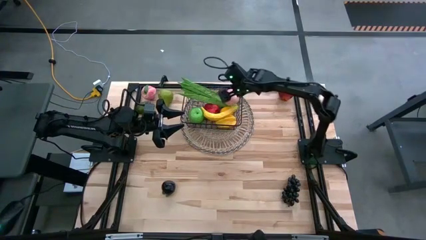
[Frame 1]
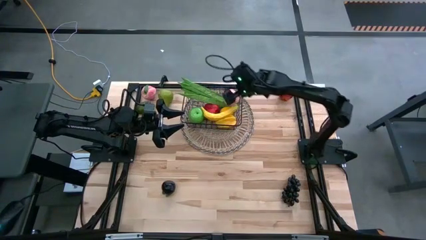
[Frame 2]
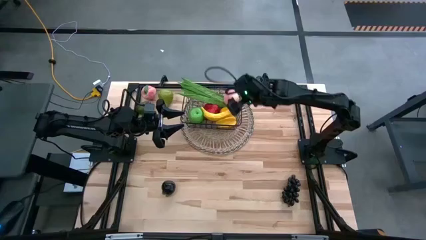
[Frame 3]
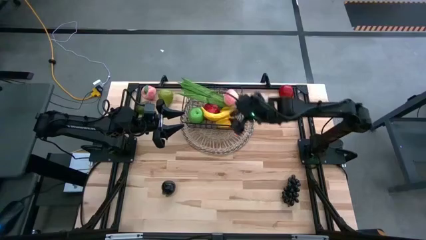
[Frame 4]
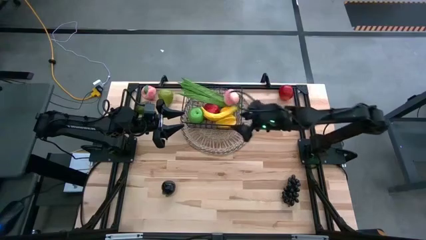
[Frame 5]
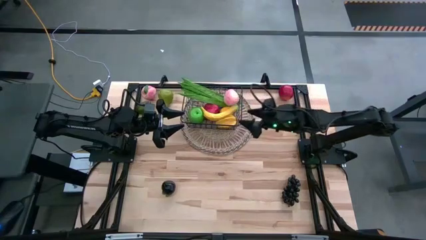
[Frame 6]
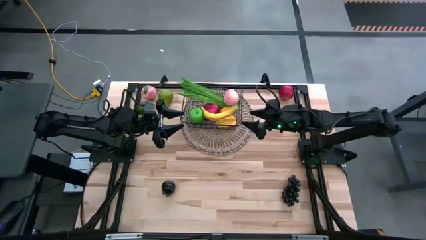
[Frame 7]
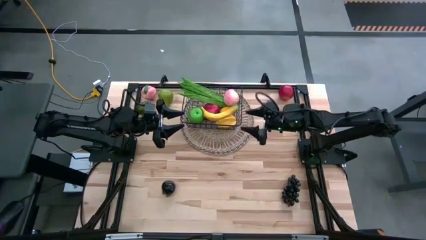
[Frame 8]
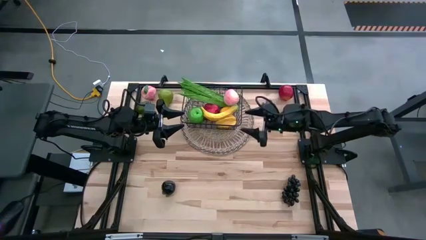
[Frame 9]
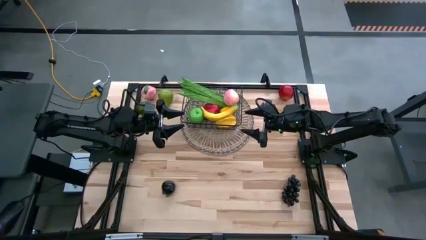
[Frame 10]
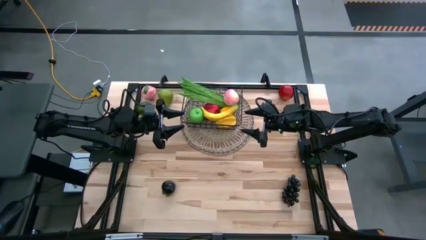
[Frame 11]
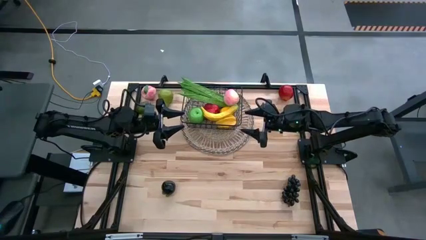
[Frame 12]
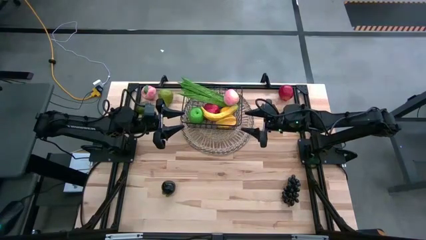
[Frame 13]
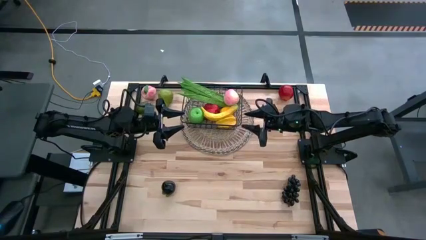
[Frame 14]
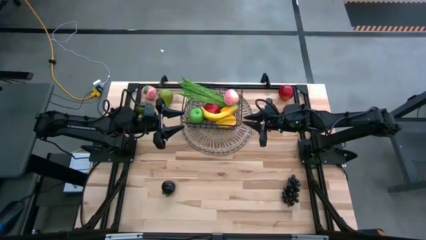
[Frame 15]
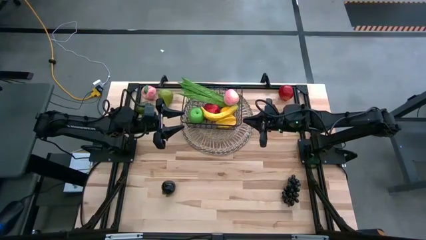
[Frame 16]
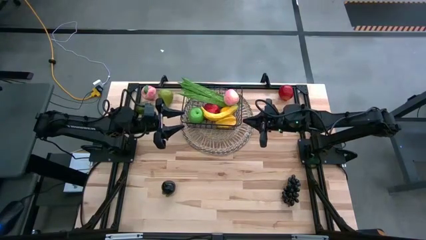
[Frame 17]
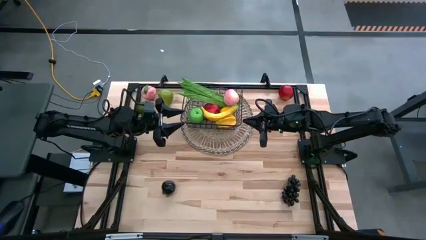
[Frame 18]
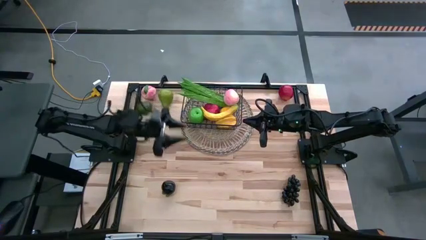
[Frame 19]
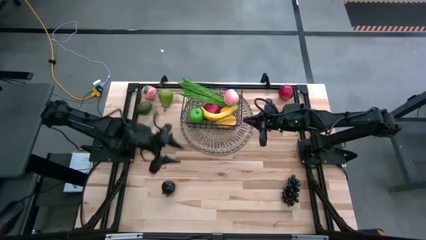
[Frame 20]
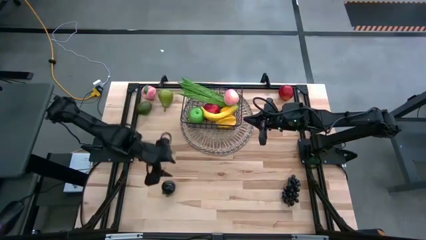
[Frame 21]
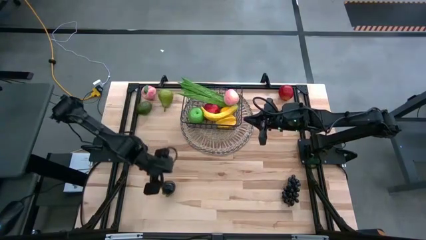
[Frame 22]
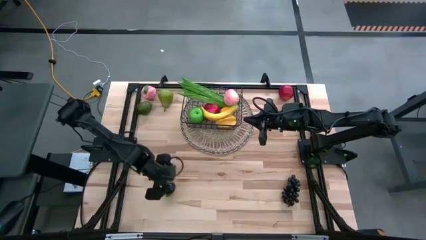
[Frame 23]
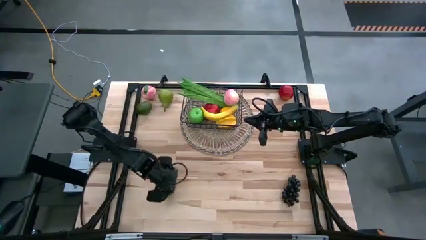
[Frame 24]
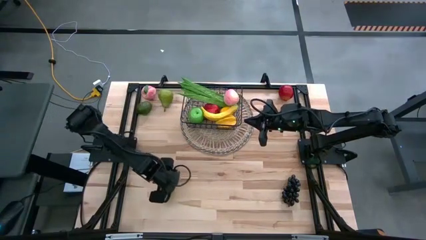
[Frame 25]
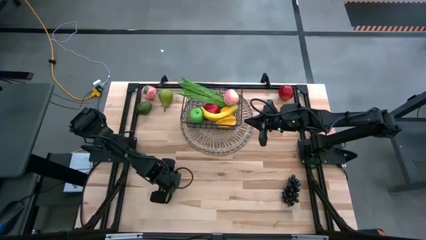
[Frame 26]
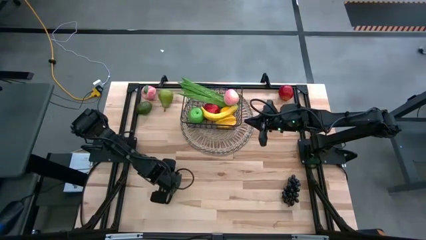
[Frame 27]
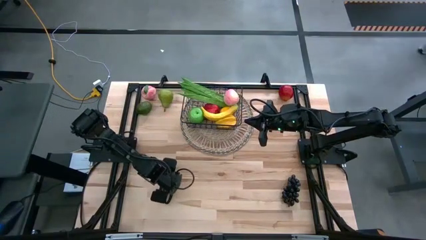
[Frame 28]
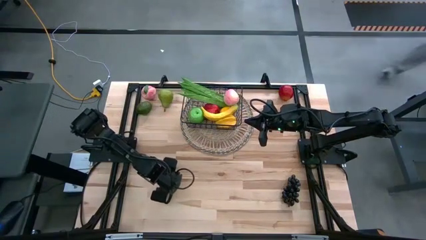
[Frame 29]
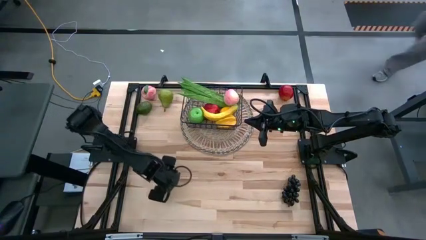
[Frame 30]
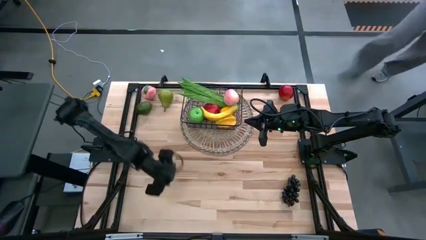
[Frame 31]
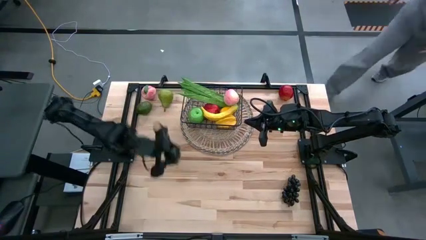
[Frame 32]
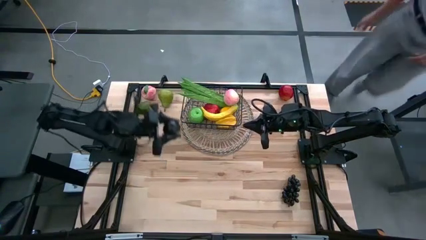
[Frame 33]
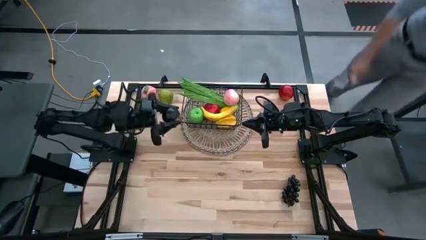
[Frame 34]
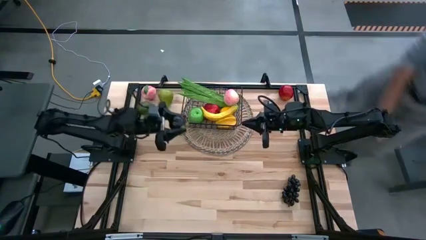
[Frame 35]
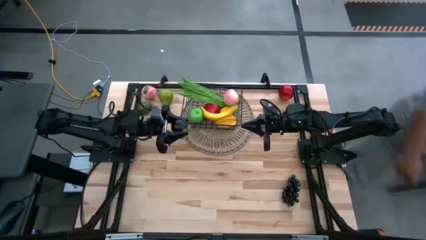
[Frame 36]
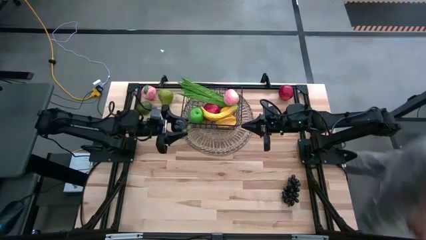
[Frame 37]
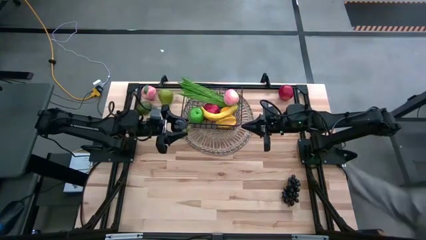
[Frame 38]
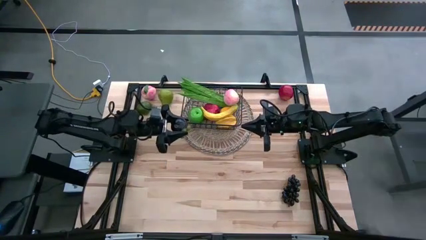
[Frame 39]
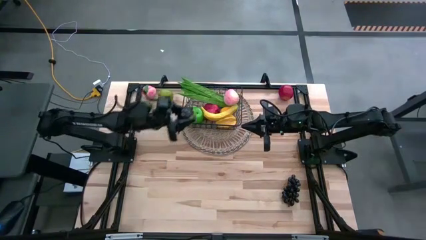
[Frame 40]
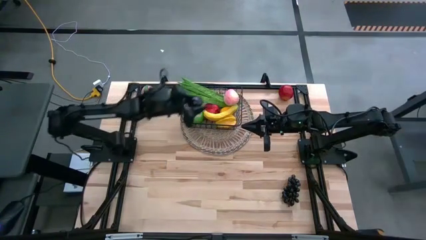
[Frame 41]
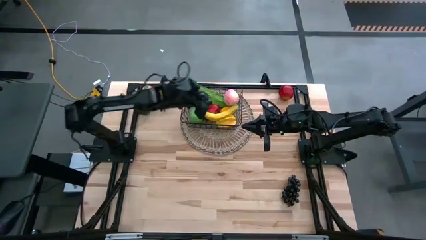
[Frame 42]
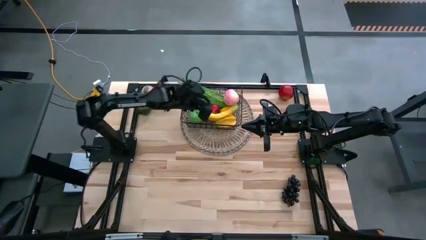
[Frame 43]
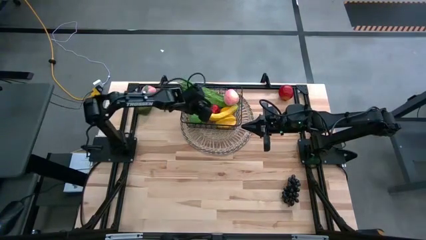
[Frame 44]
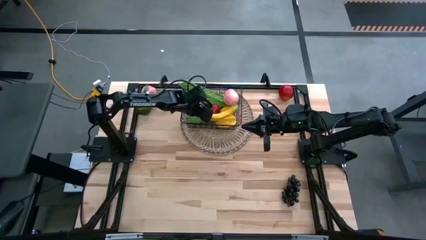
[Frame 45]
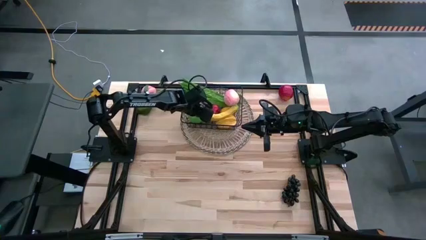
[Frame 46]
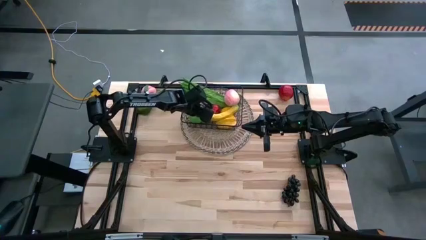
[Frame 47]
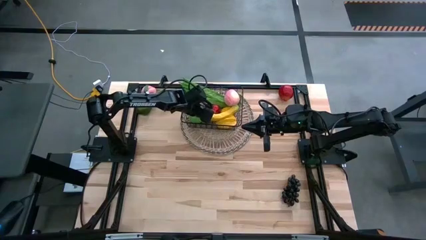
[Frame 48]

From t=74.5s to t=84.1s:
Task: Build produce basket
Put the plum into the black wire basket

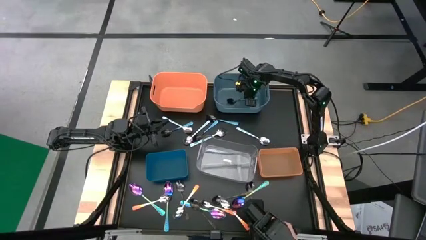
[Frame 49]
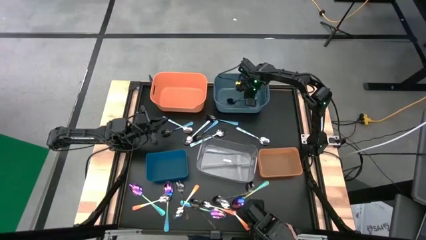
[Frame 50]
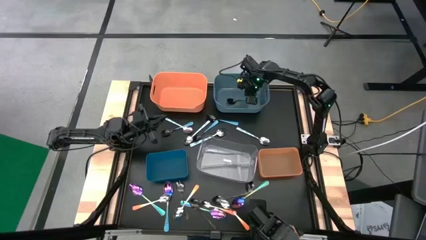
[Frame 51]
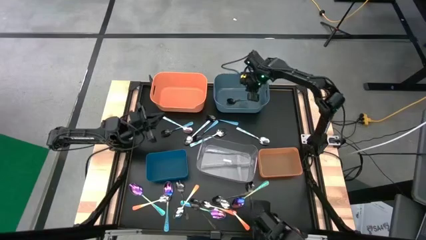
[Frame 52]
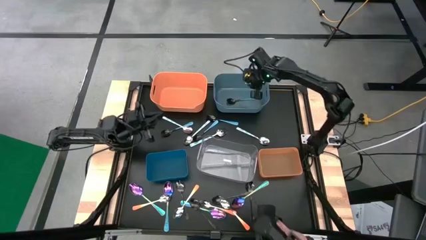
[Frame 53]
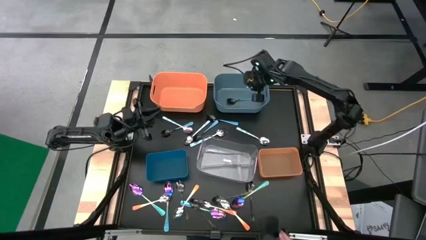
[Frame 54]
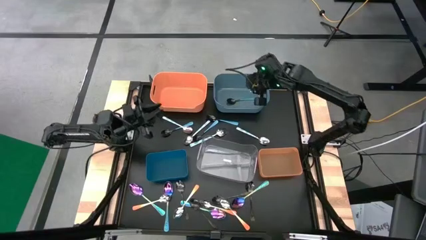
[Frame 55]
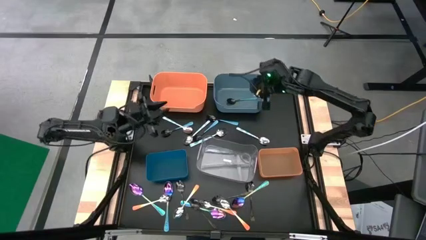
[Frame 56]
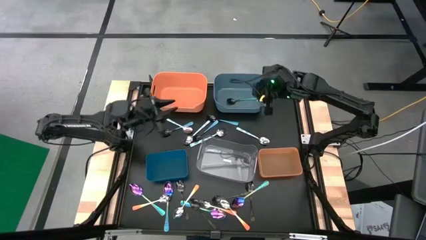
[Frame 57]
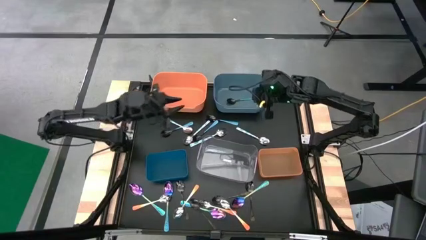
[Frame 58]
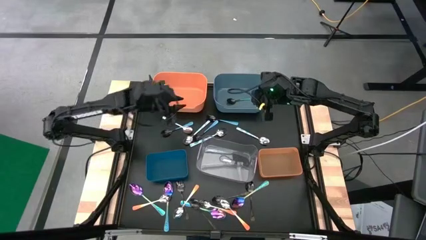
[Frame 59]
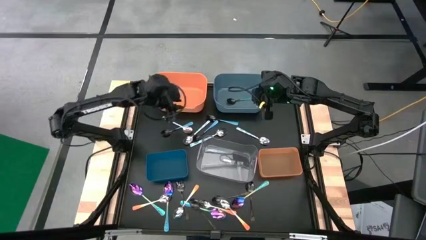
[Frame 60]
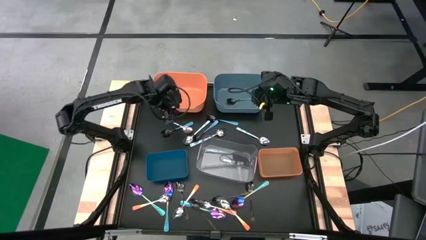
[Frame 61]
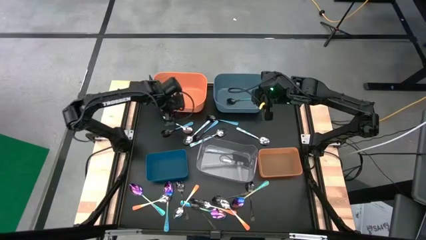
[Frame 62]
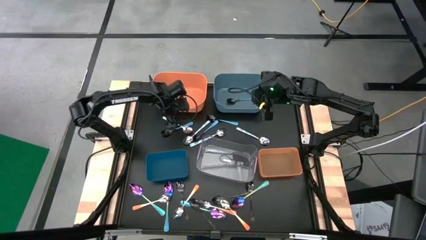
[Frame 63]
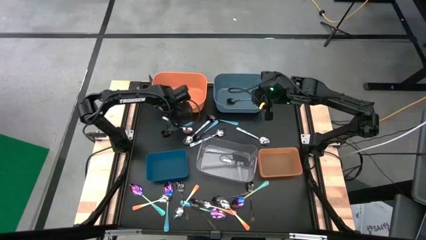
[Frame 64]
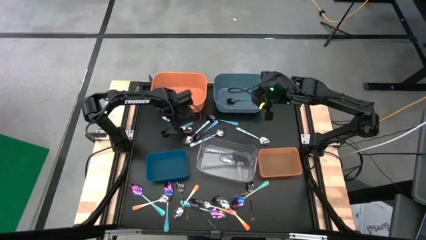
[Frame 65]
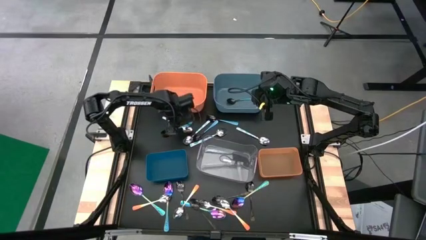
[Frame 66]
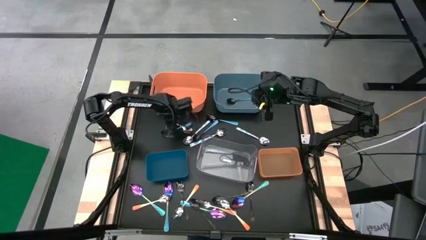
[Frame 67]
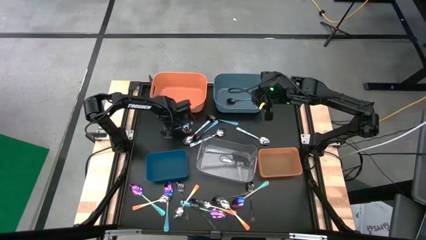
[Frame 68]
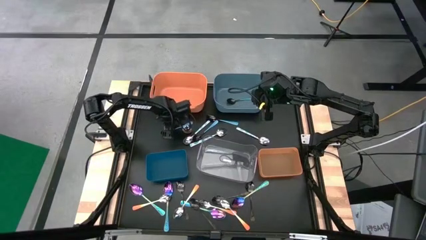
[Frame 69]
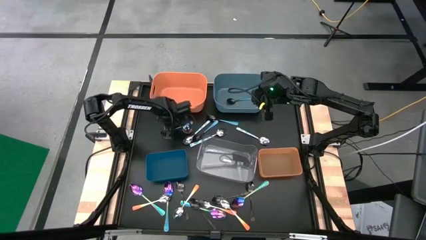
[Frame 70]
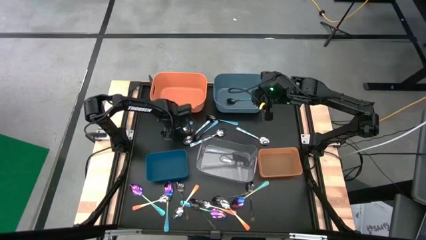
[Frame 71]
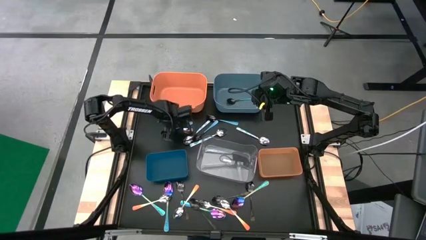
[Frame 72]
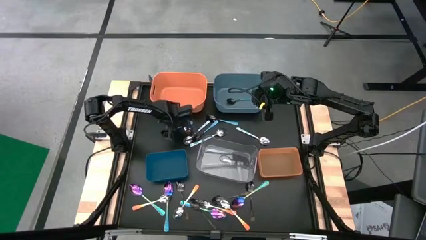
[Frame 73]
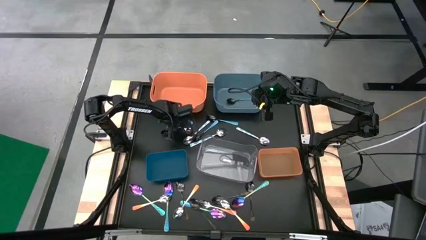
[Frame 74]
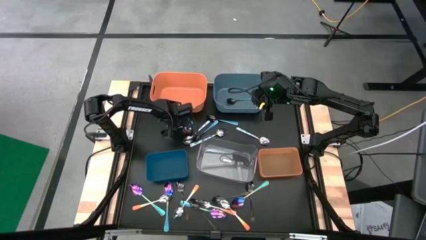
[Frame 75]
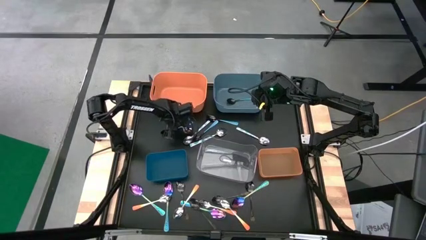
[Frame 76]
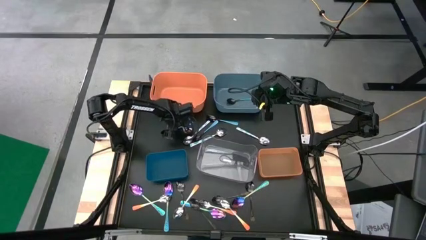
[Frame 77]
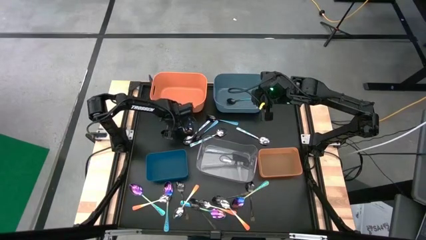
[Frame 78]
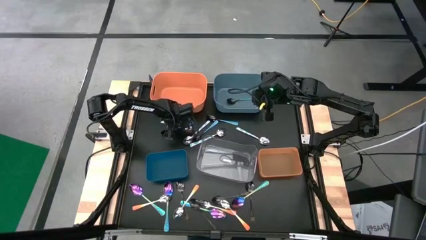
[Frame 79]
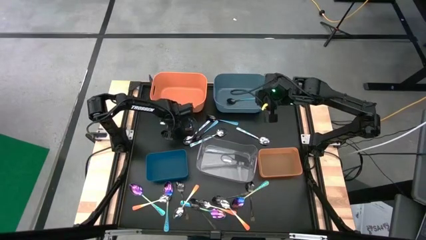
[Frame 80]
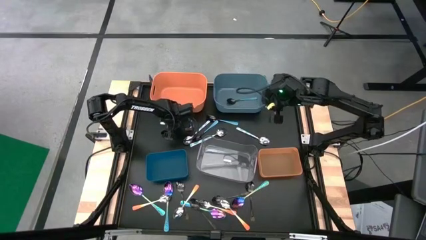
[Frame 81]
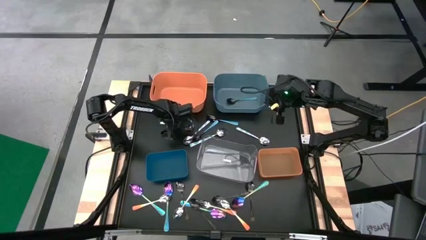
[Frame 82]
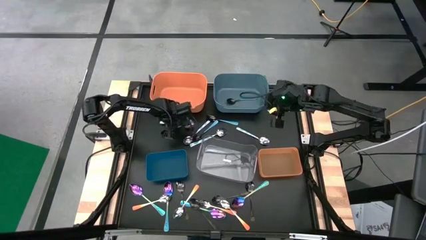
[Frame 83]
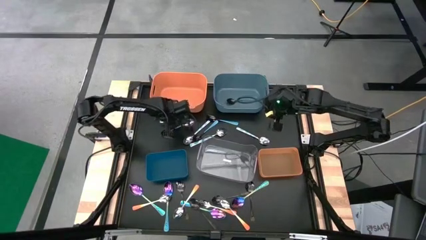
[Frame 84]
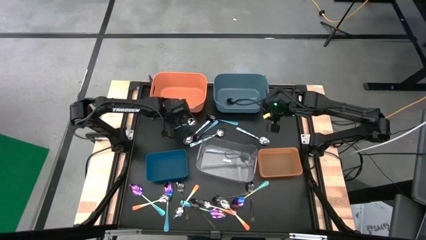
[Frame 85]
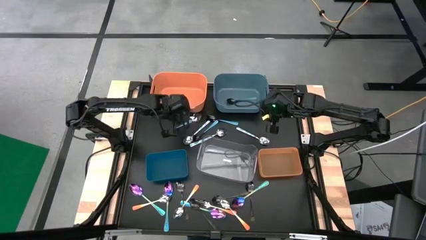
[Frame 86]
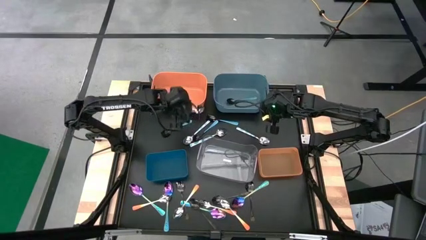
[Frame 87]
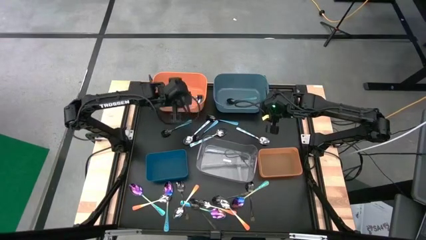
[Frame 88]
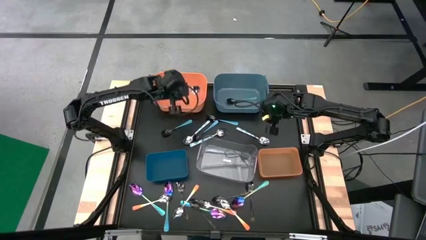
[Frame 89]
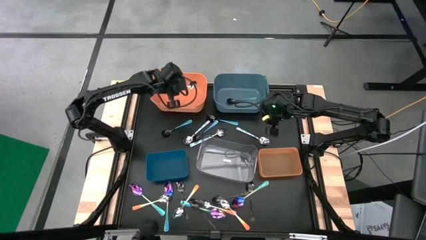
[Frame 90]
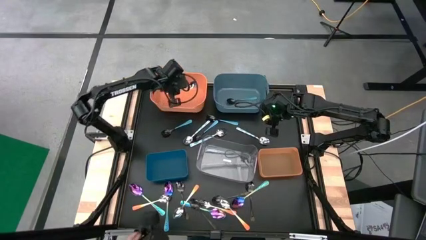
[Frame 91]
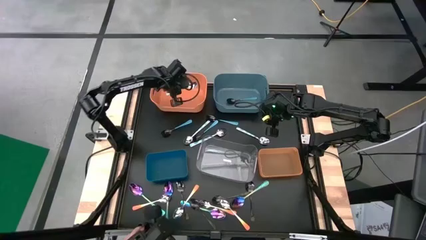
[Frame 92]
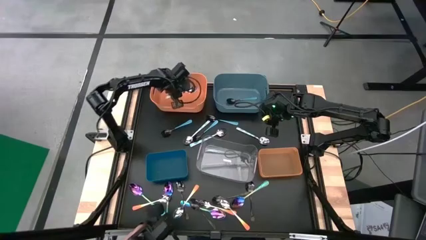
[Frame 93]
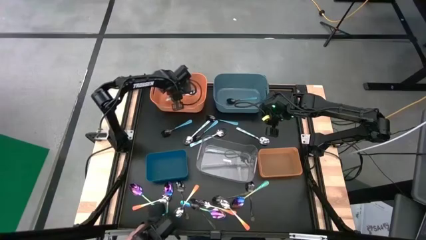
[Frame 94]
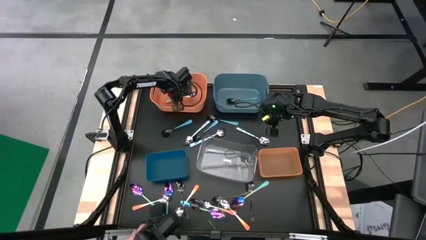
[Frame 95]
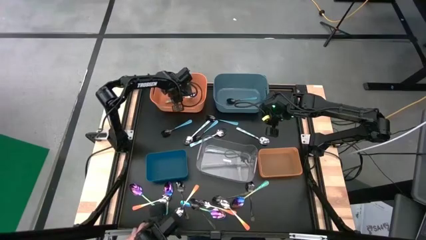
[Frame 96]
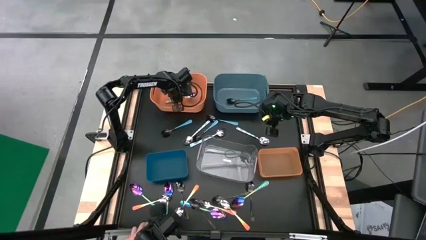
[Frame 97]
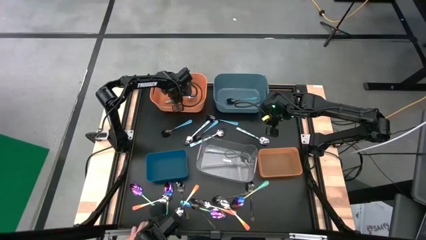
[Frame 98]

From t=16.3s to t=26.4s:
Task: Sort silverware by color (type)
Put the white patterned spoon into the orange bin
